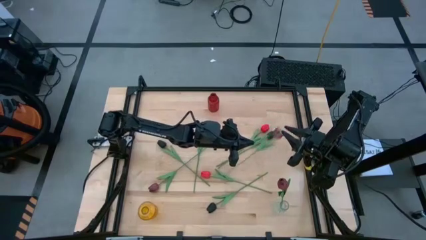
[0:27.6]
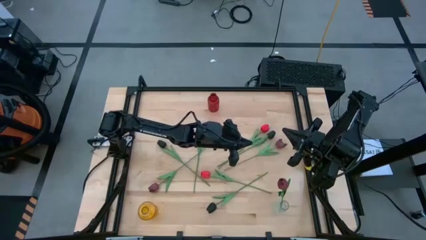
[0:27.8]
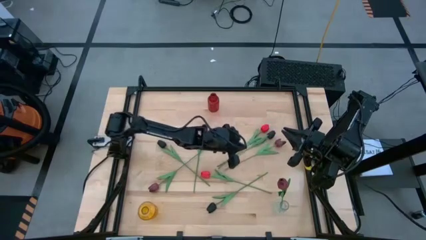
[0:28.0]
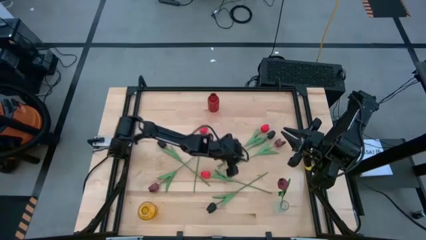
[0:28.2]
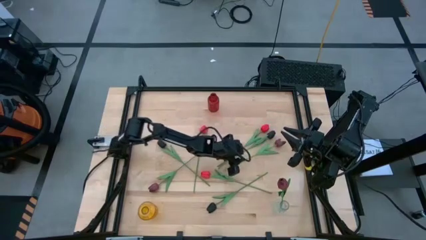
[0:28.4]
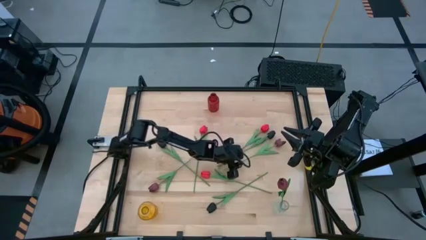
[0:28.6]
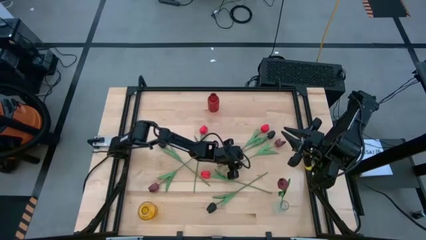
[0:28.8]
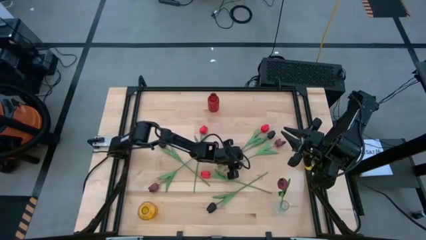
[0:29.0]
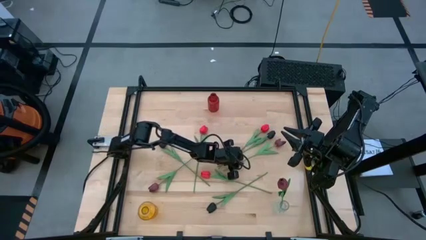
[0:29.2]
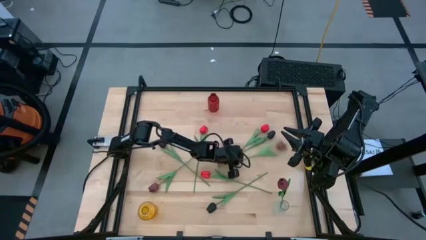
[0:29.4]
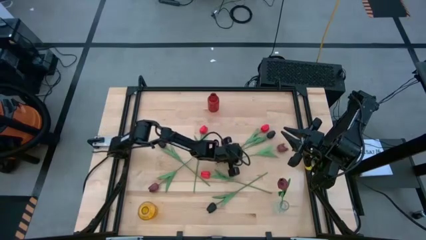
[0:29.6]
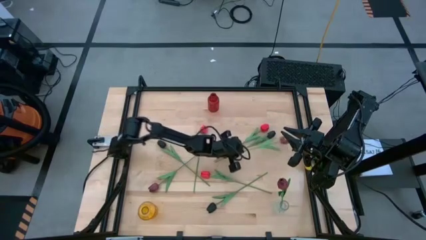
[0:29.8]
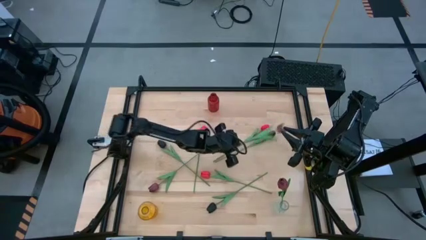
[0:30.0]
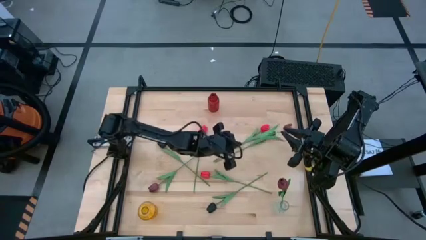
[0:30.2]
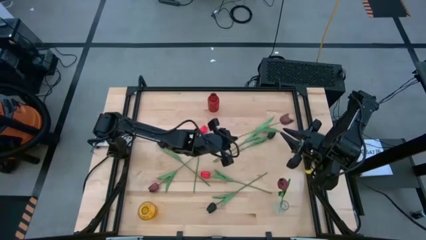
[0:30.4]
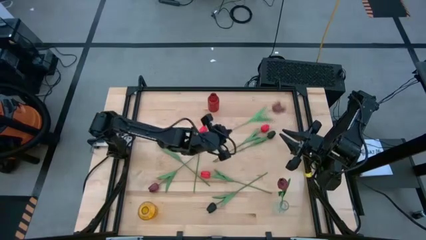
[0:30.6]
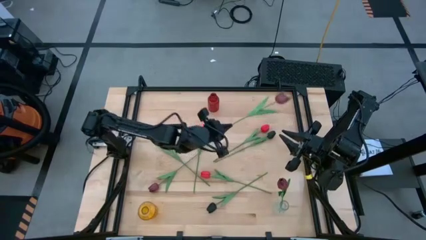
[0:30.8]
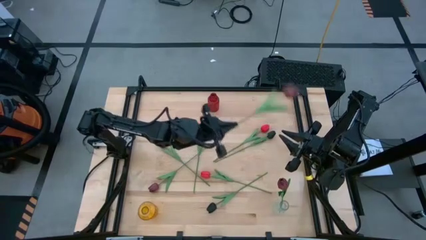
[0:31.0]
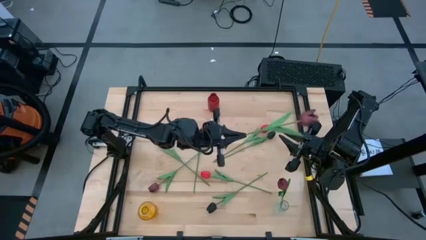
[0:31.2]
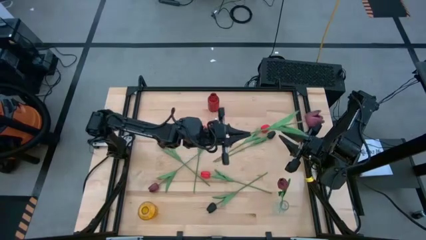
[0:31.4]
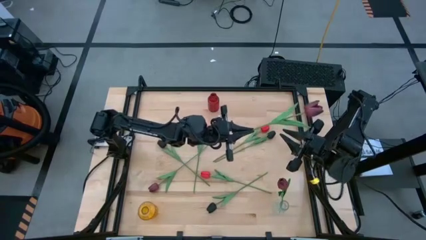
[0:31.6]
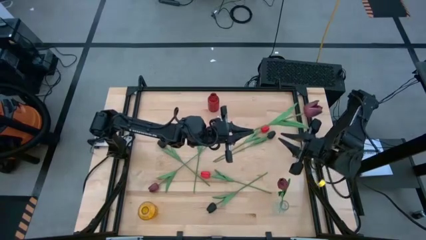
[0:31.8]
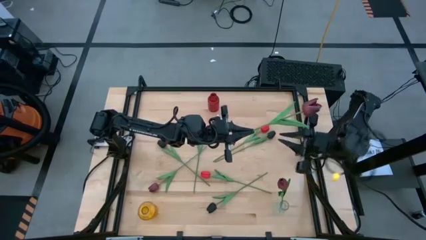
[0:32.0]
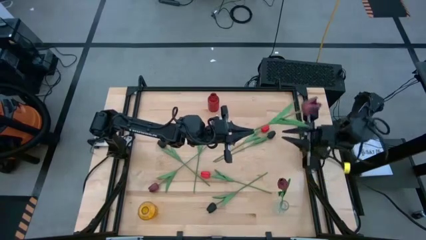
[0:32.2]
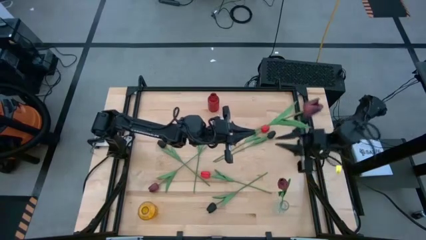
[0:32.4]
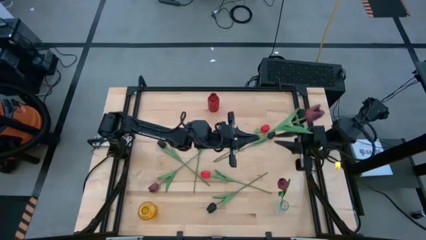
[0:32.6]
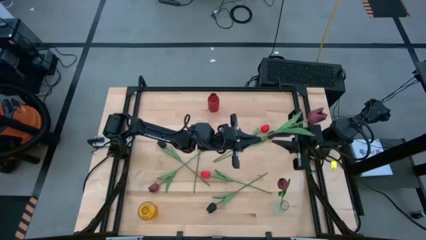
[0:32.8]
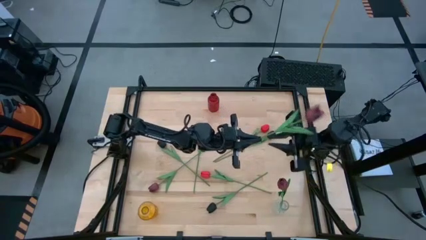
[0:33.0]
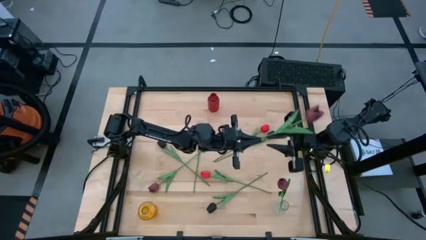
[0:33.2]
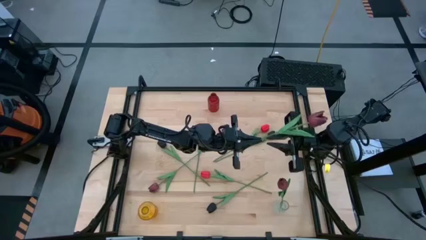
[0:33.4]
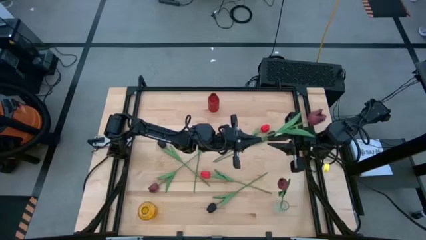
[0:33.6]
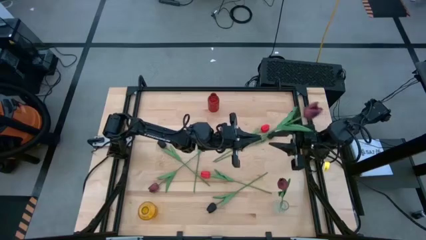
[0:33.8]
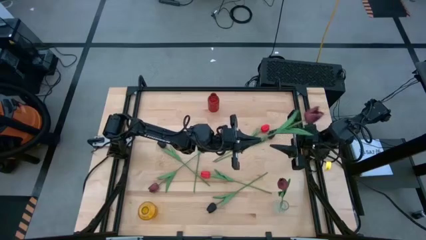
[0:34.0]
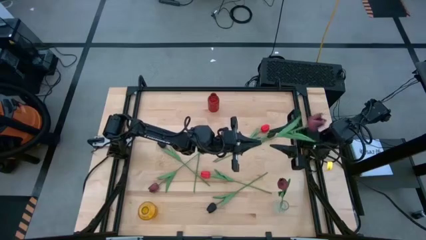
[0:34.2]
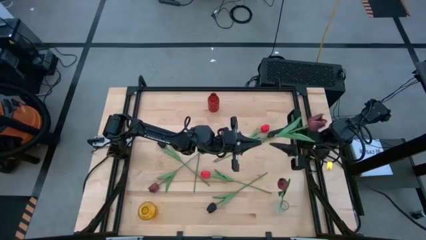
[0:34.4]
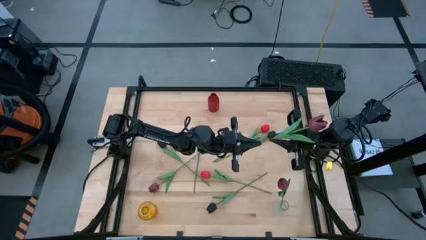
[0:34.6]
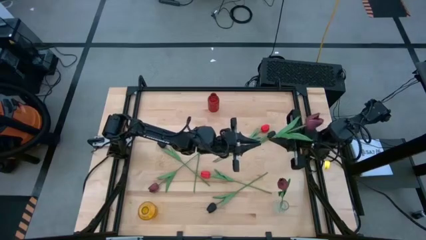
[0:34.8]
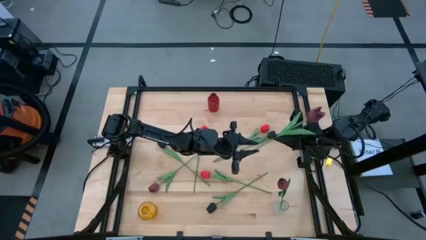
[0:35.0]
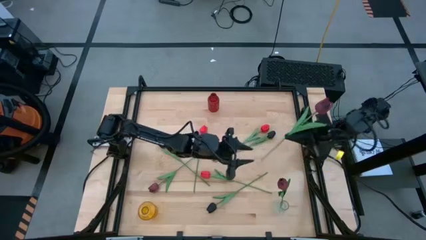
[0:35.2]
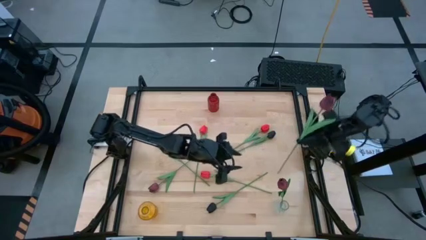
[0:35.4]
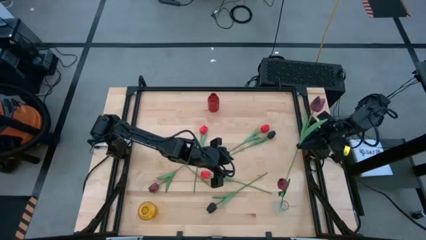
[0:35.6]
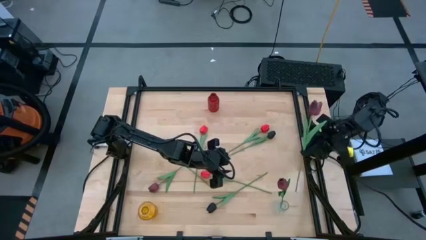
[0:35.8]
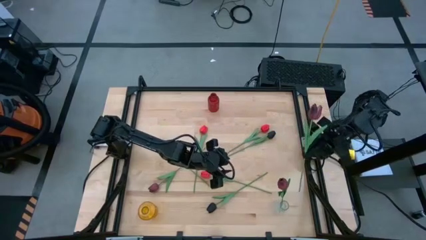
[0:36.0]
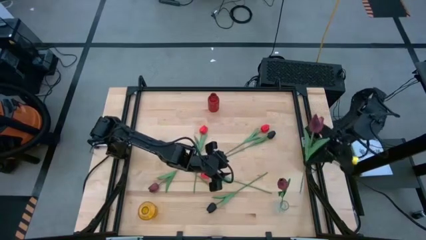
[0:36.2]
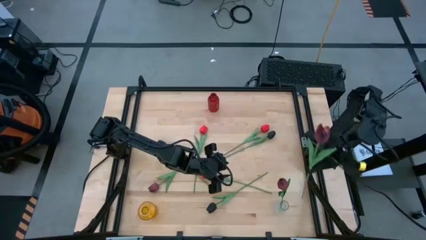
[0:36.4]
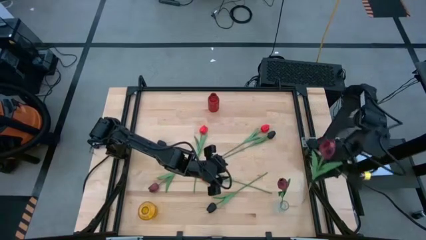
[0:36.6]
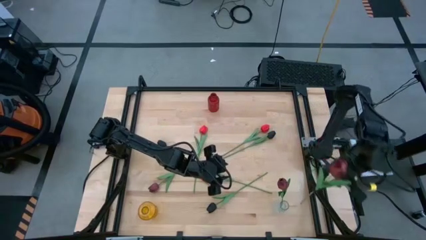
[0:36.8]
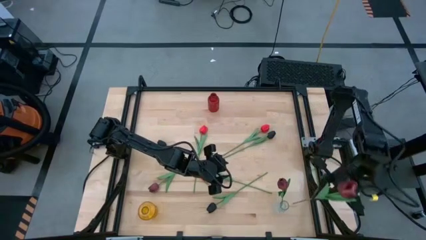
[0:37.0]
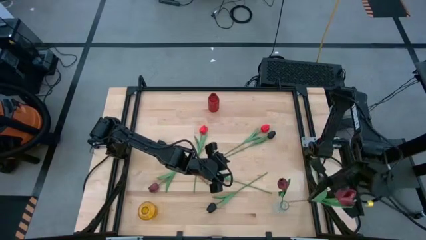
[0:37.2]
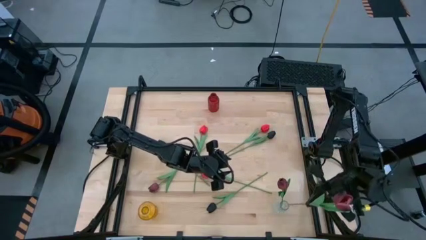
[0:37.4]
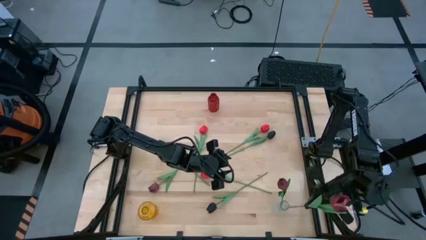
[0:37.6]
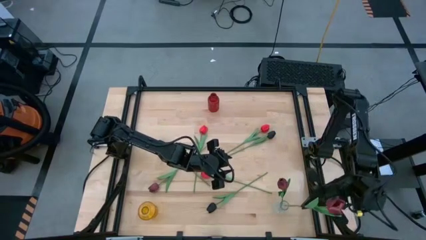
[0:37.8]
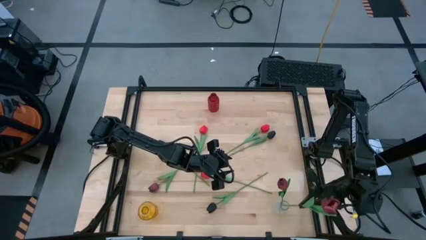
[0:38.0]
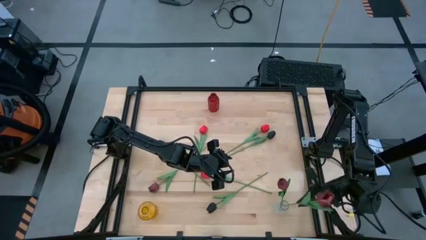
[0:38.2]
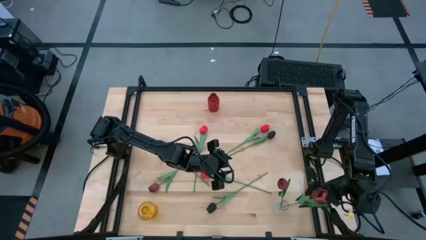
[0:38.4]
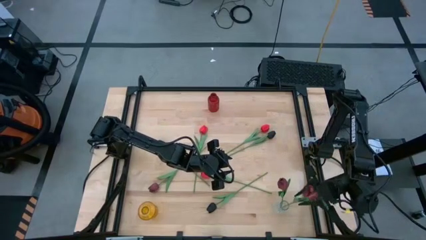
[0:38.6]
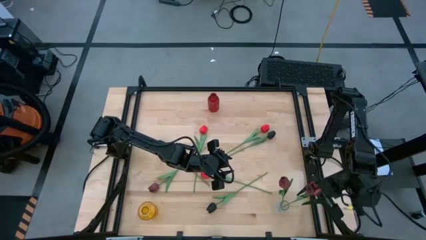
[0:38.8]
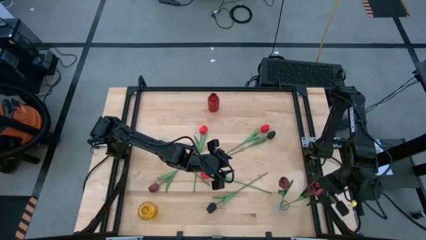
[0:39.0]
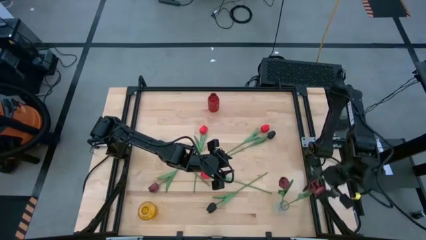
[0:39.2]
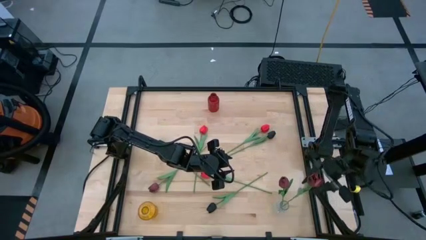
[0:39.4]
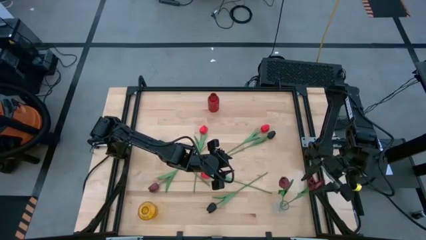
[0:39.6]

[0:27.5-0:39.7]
Task: Sort flowers into vase by color
Put the top dark red flower into the transparent vase

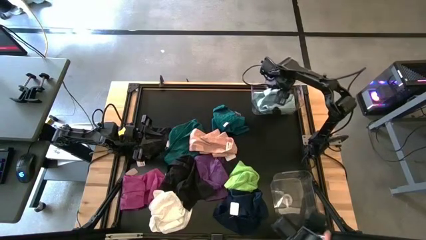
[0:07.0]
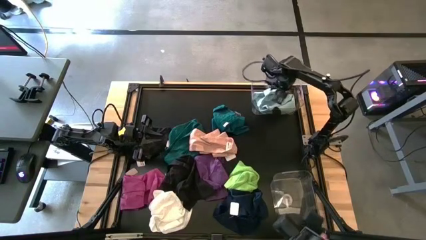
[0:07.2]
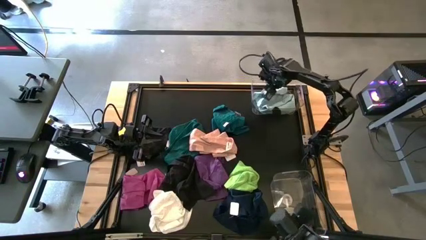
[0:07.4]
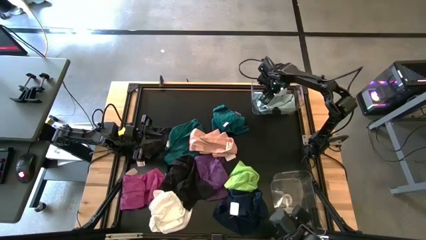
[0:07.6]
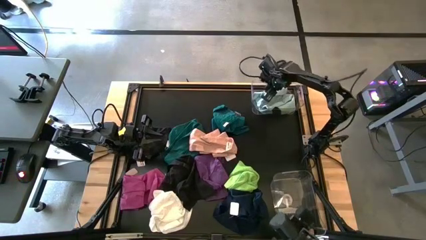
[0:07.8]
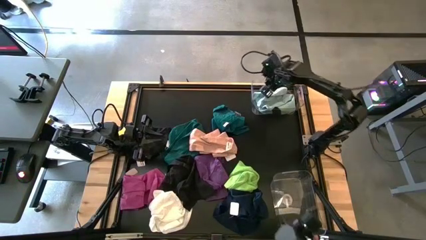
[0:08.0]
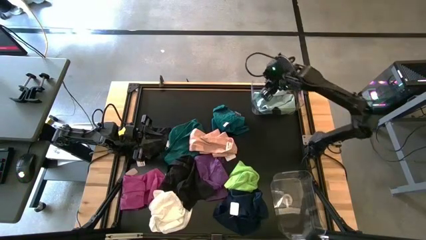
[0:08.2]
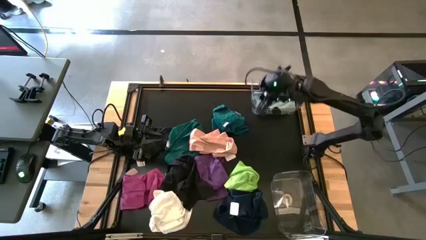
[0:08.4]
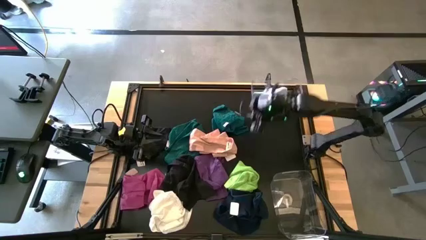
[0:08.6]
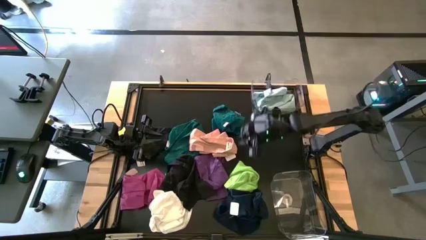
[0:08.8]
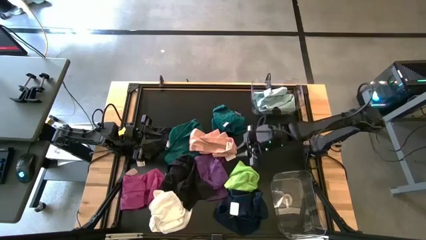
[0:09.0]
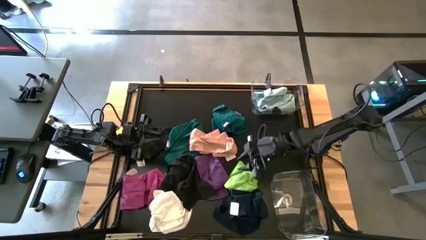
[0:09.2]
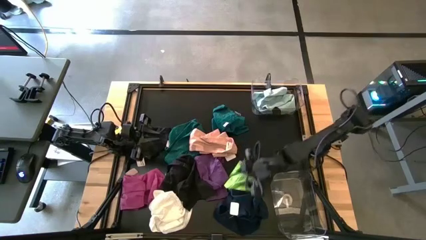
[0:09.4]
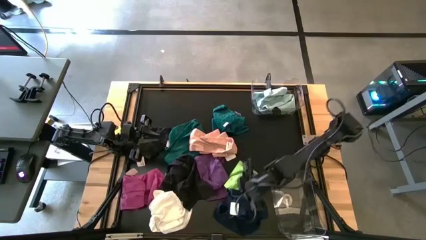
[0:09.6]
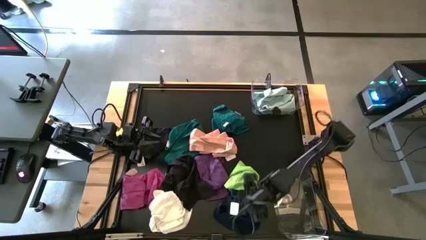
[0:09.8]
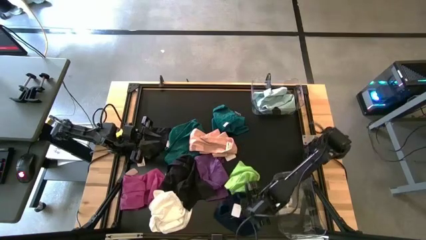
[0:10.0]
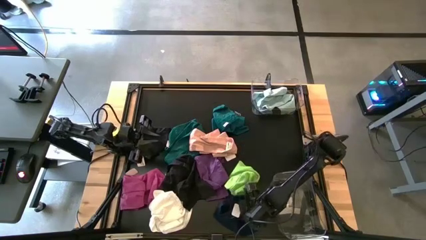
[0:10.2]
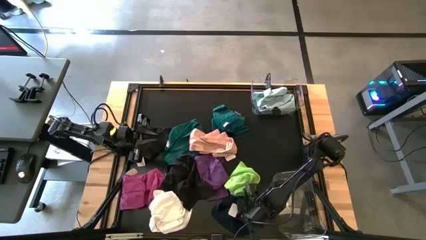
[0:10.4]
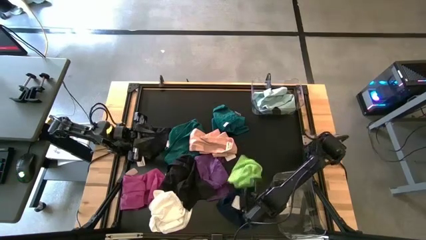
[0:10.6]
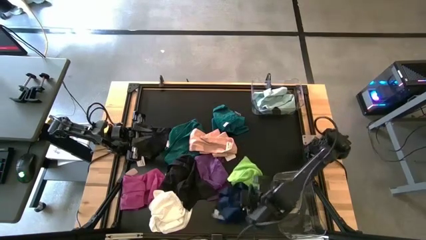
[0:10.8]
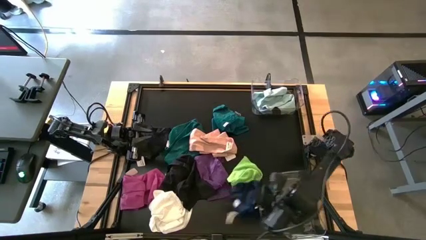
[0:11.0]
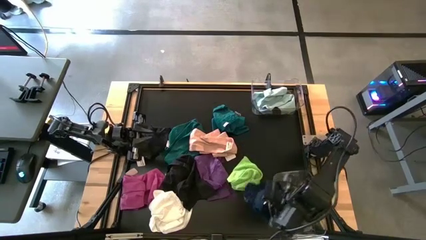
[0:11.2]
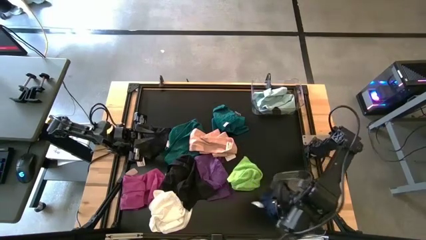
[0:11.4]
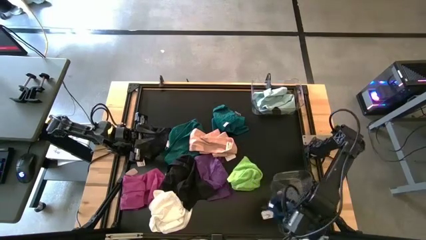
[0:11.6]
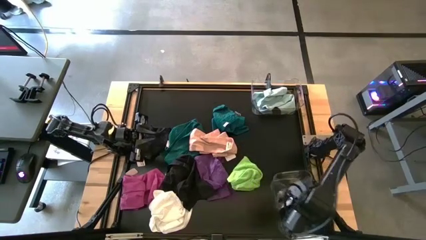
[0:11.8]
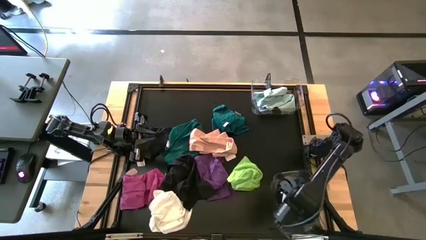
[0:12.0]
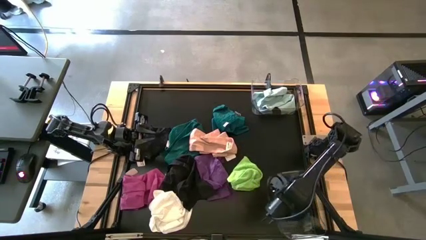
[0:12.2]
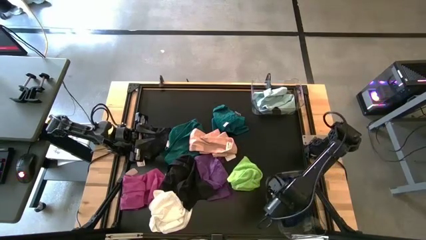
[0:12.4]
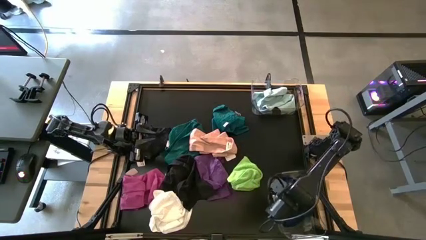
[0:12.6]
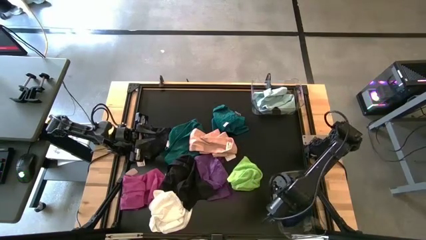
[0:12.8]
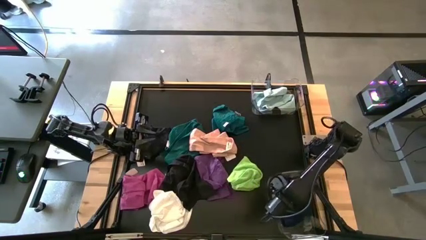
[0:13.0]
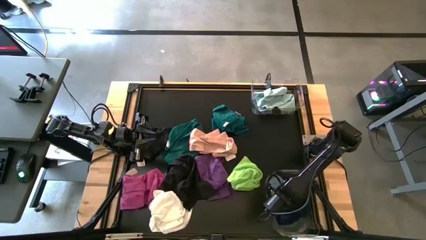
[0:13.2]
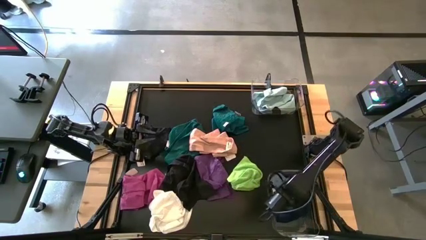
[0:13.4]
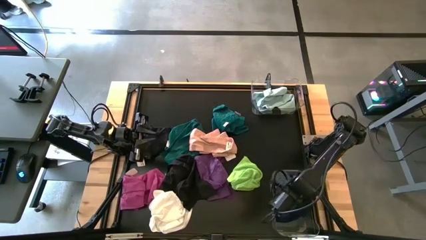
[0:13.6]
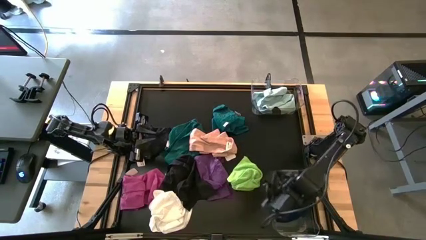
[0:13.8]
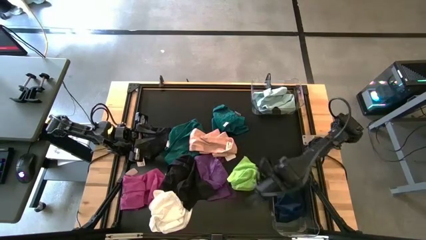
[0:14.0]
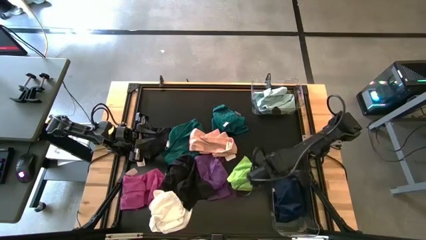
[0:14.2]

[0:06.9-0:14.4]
Task: Sort towels by color in basket
Put the dark blue towel into the bottom transparent bin
